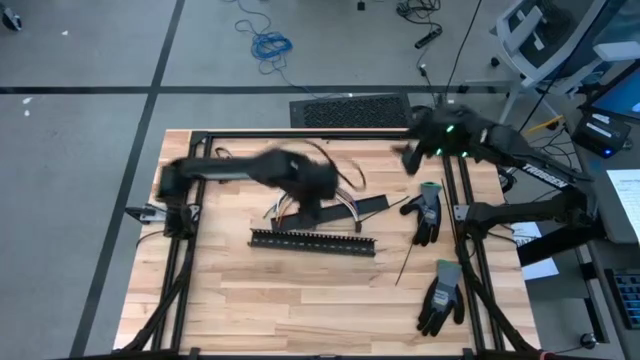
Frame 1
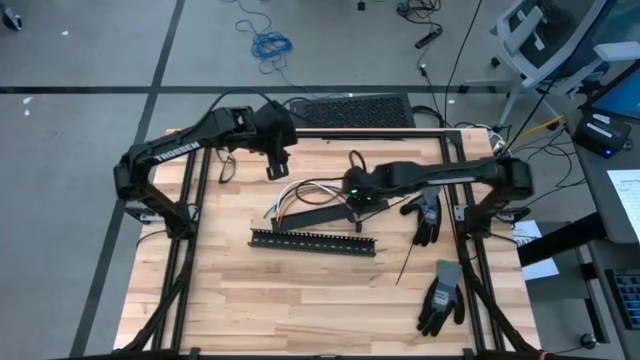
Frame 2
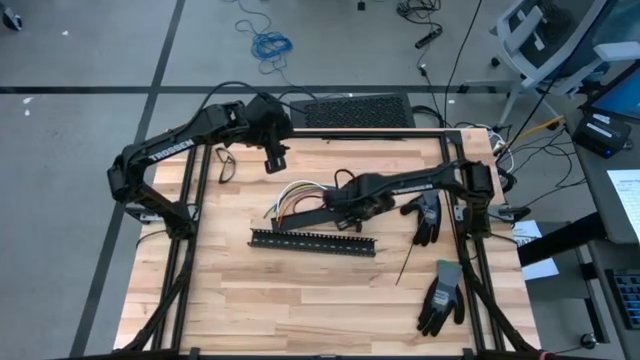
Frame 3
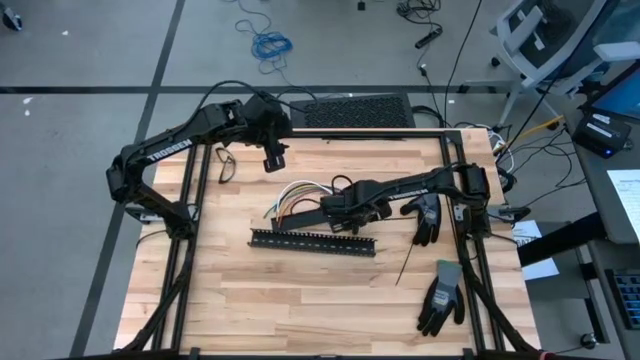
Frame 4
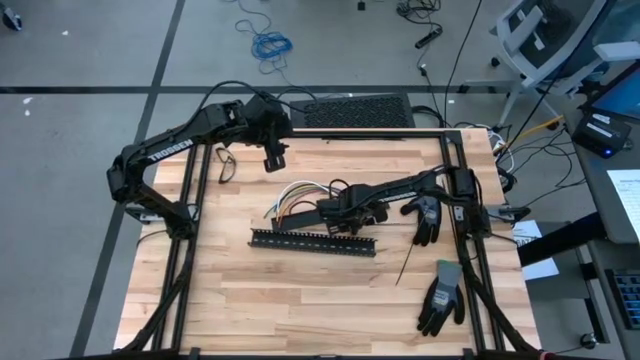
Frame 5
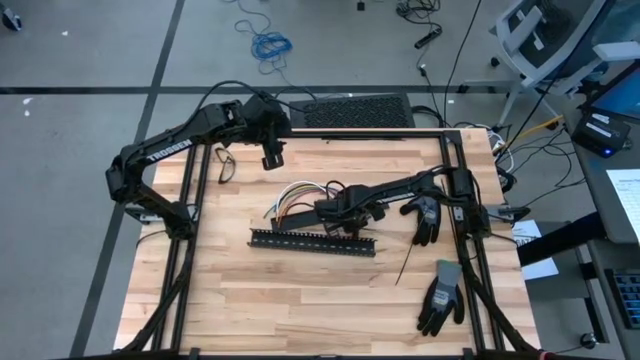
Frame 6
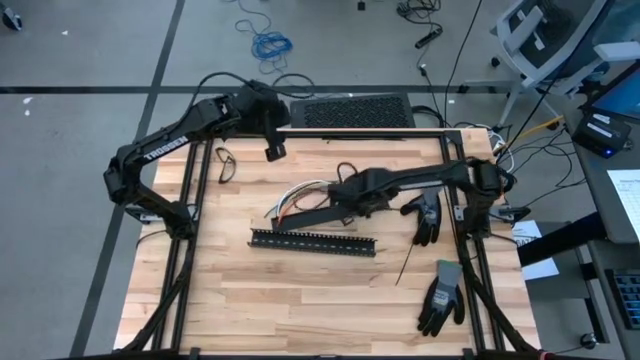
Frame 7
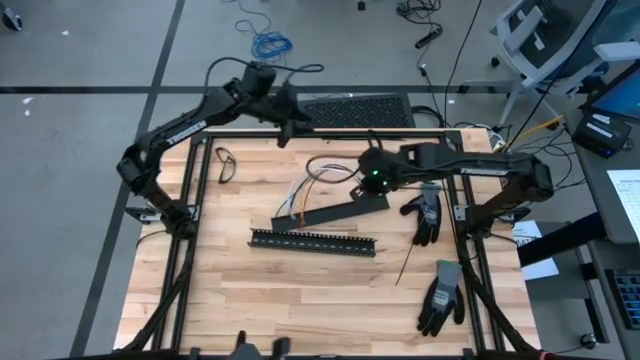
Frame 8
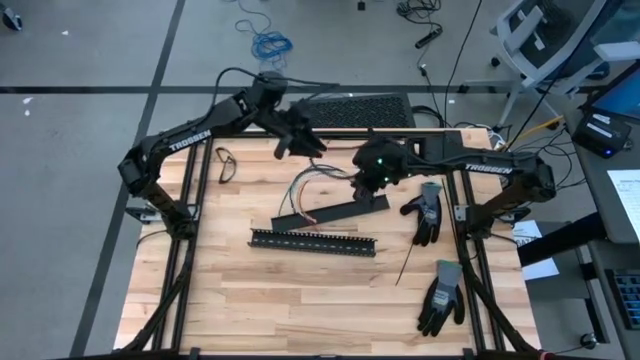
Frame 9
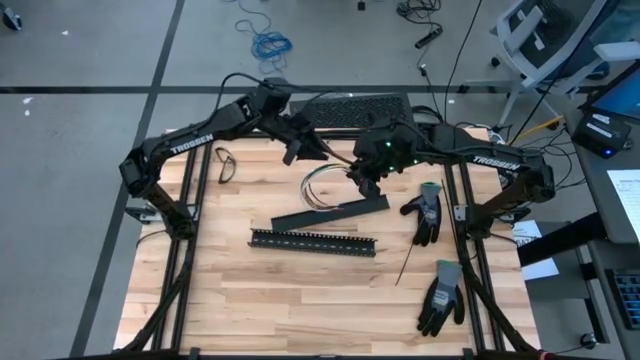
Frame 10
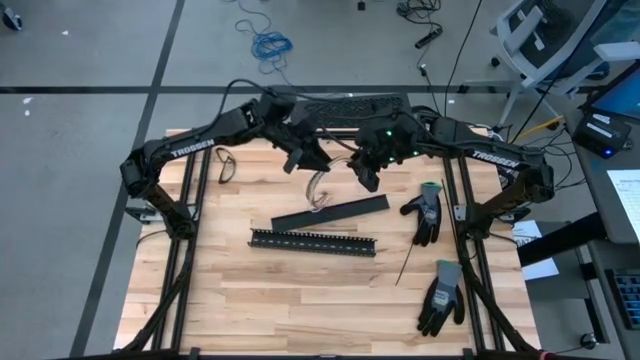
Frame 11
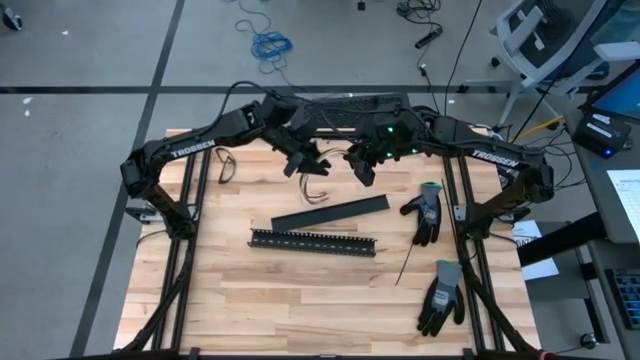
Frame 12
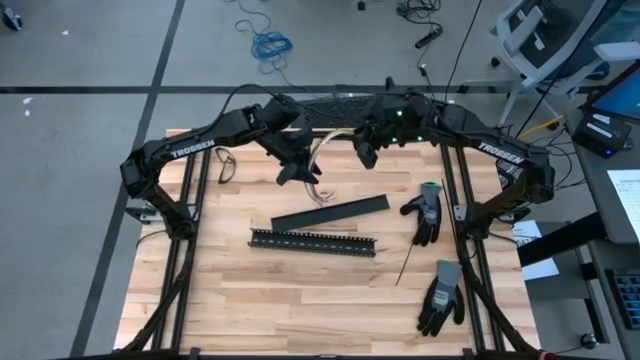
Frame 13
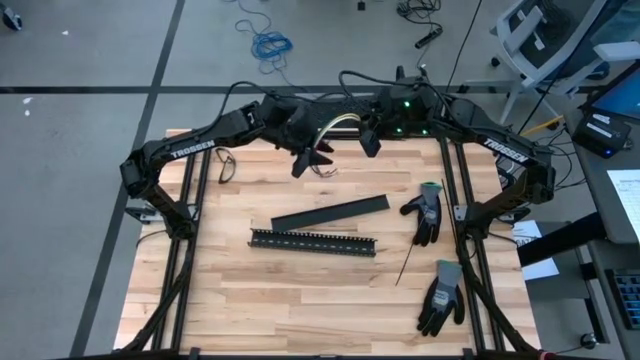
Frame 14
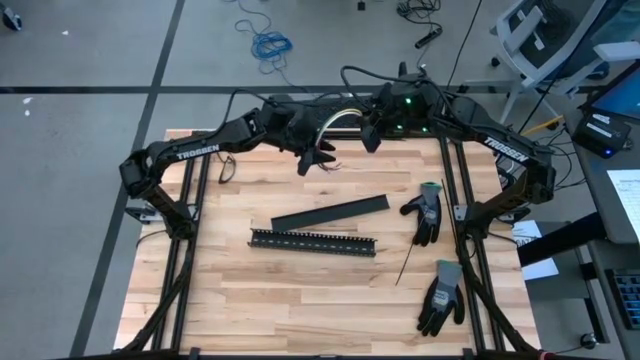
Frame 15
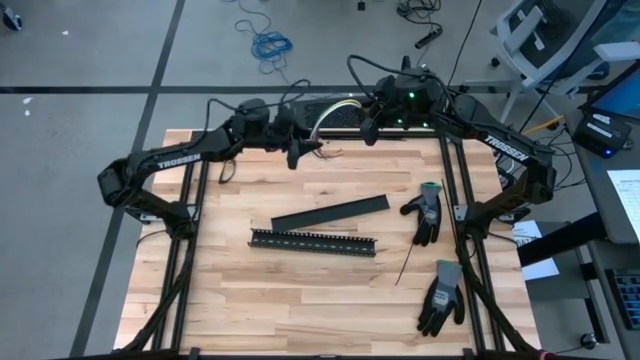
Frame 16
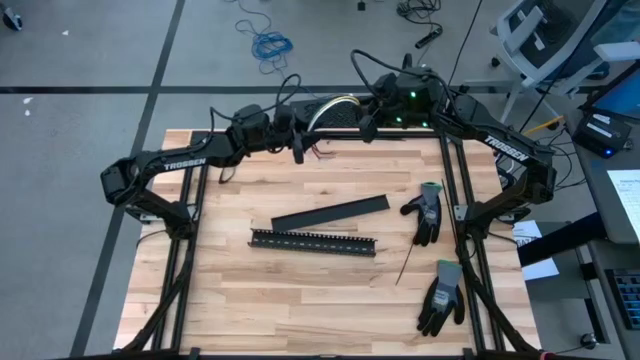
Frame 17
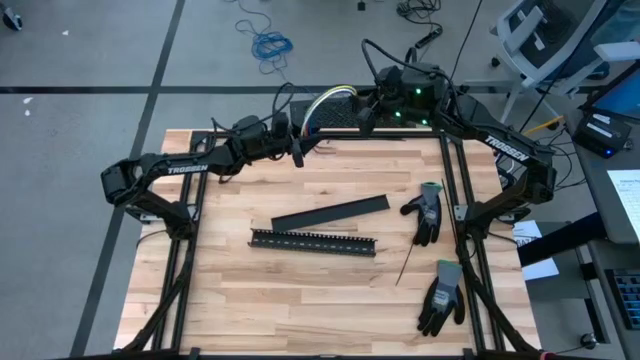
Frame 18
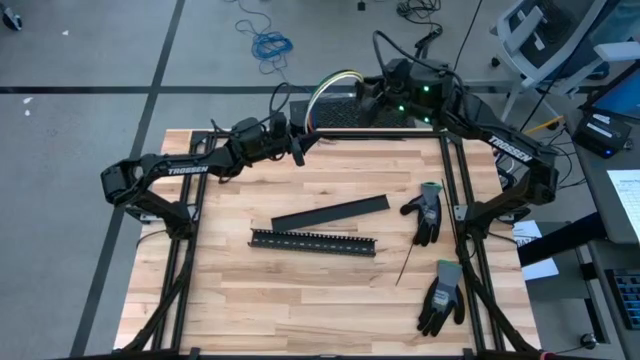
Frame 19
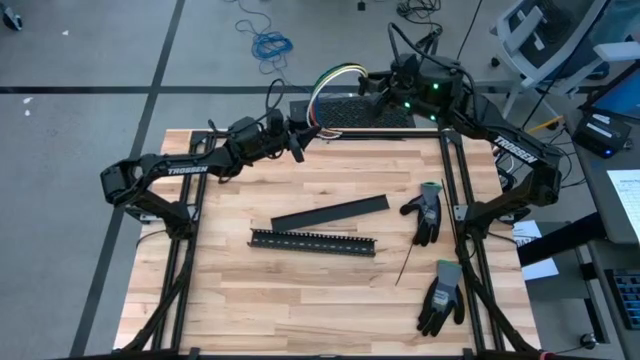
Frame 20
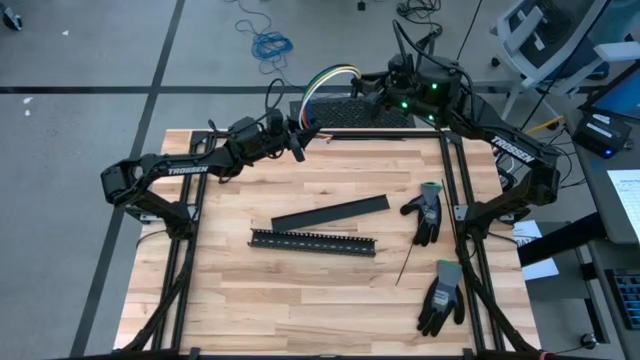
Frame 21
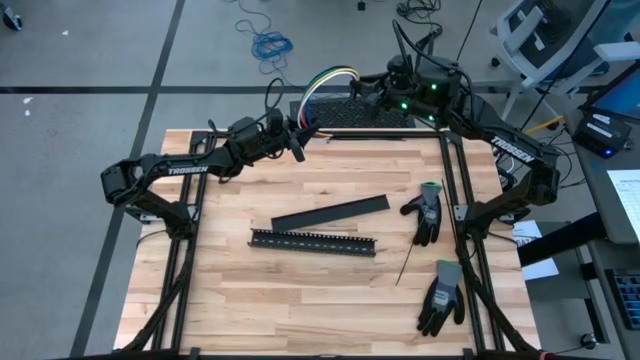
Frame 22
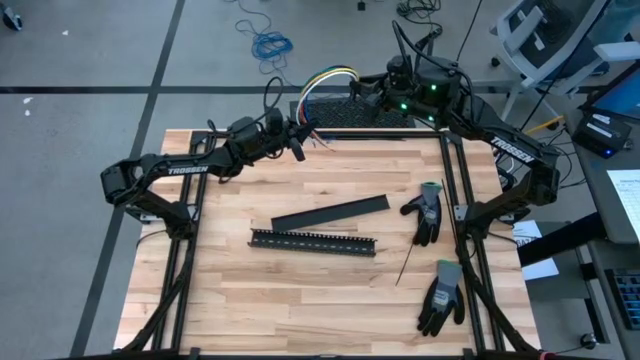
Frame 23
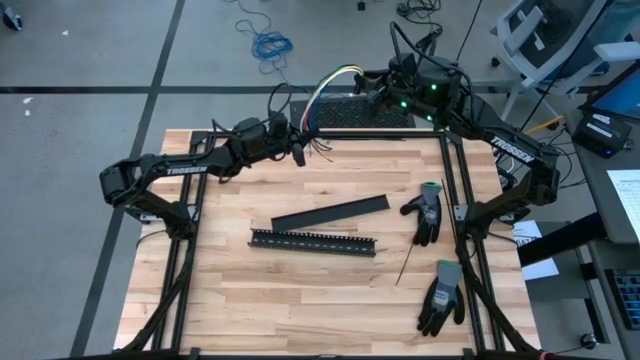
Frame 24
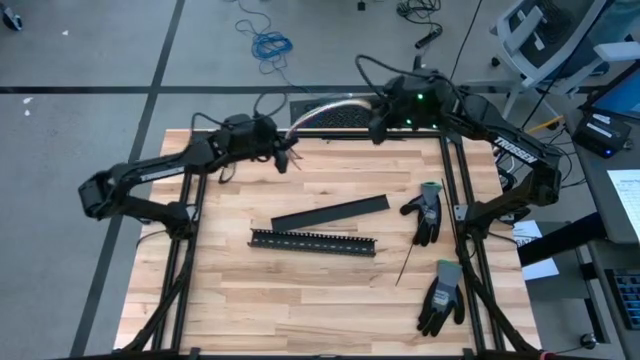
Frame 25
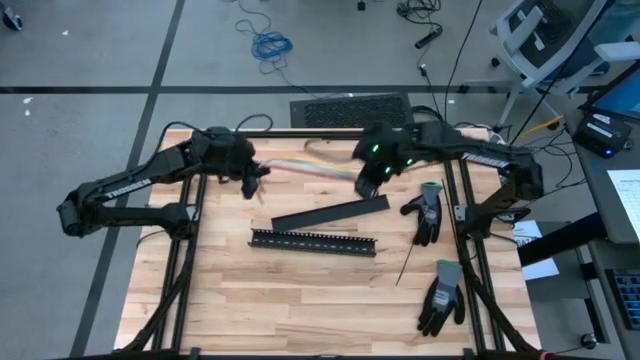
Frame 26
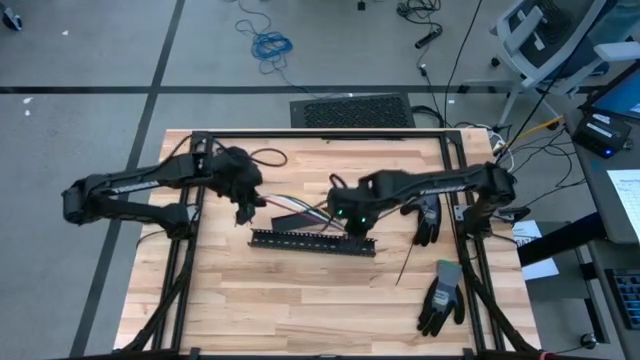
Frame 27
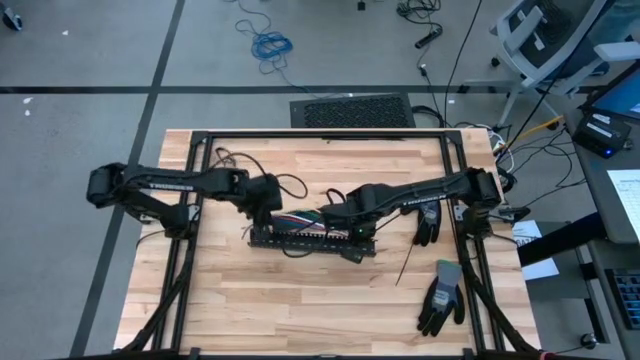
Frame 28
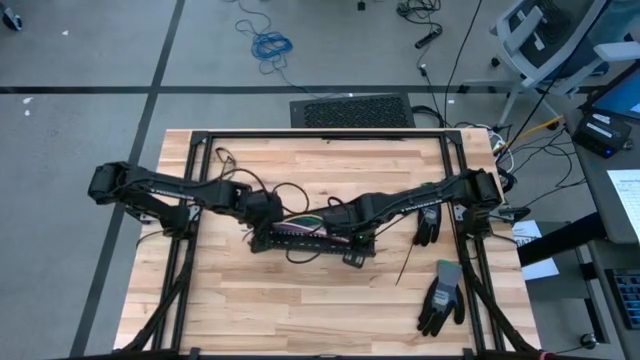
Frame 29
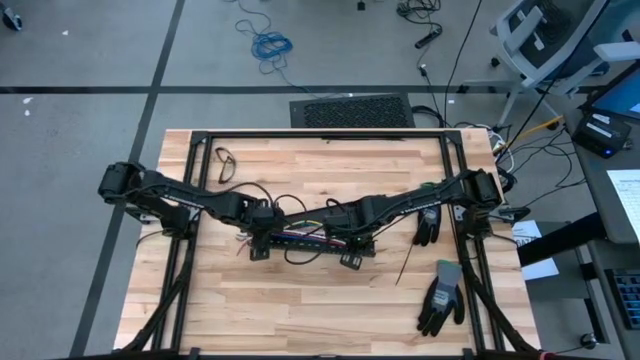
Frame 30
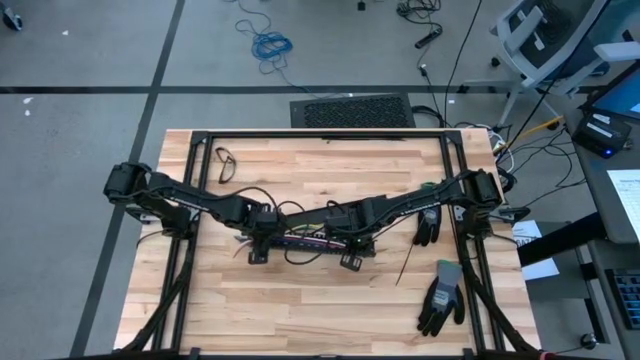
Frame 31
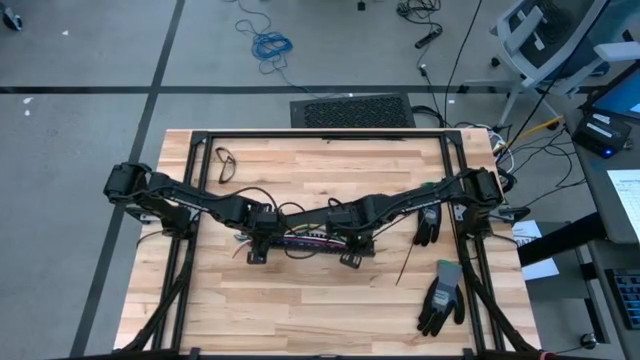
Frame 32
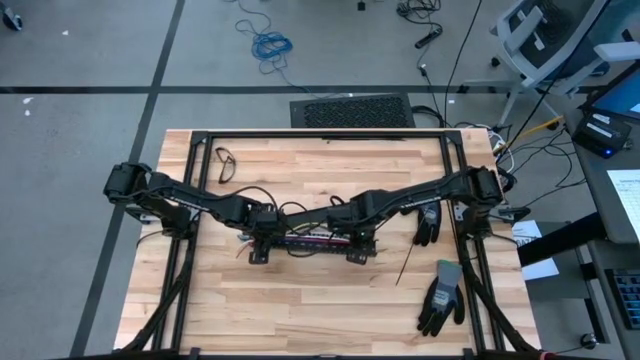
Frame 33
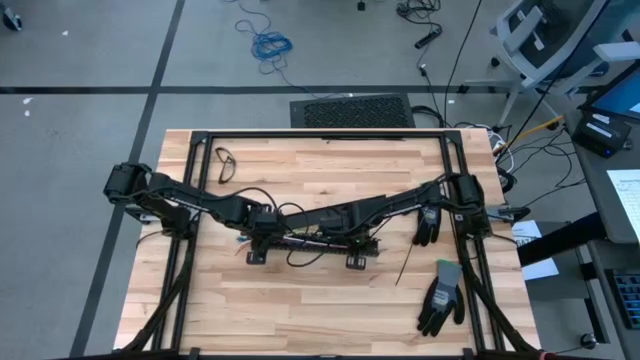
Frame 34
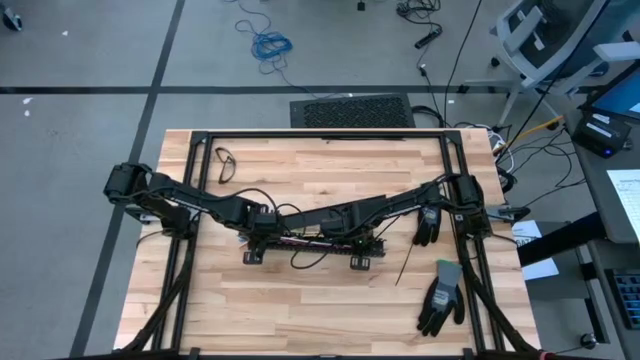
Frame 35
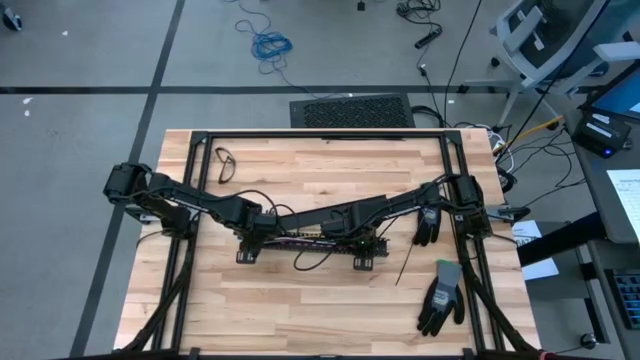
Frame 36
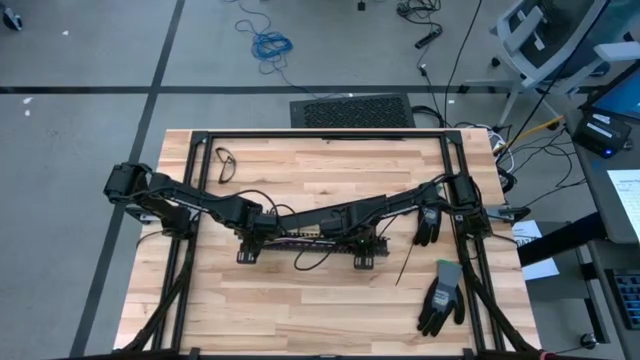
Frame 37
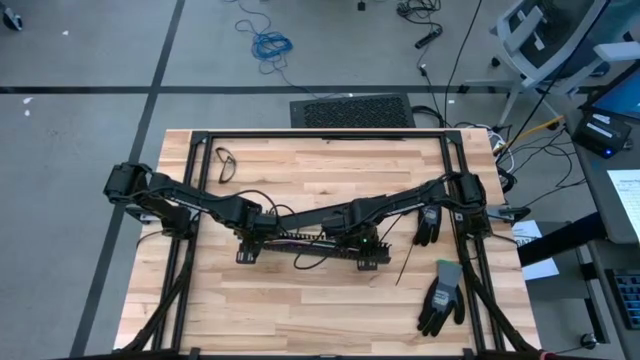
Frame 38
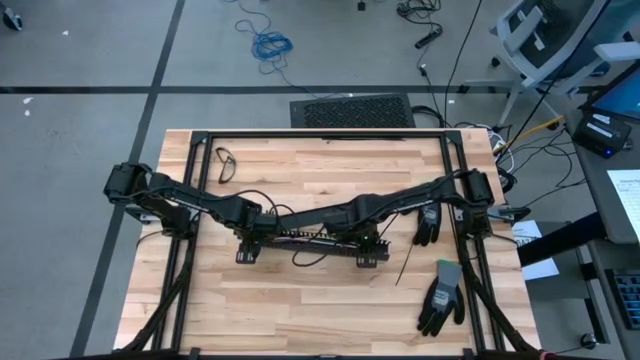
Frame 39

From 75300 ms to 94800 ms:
Task: Ziptie cables
Put the zip tied cables into the black cable duct

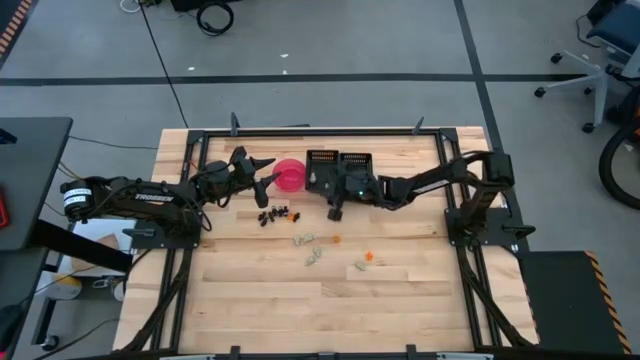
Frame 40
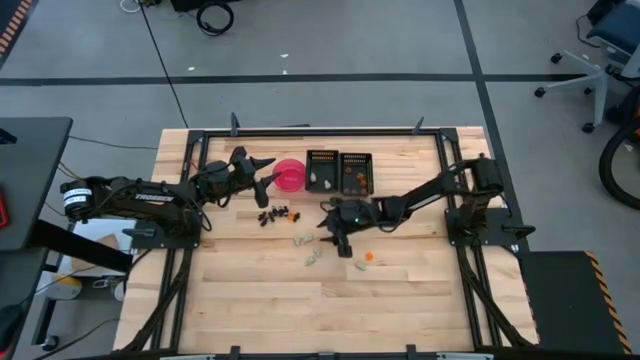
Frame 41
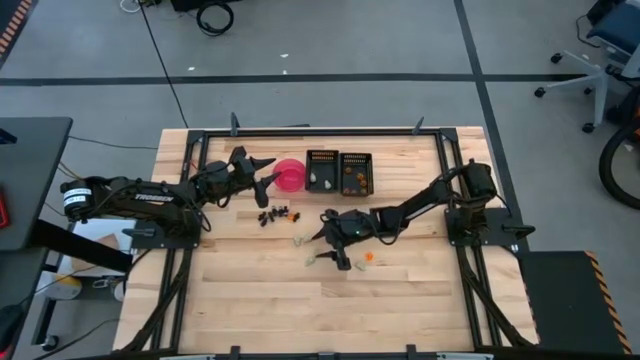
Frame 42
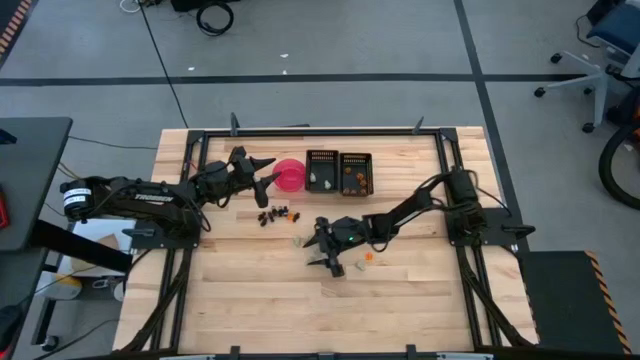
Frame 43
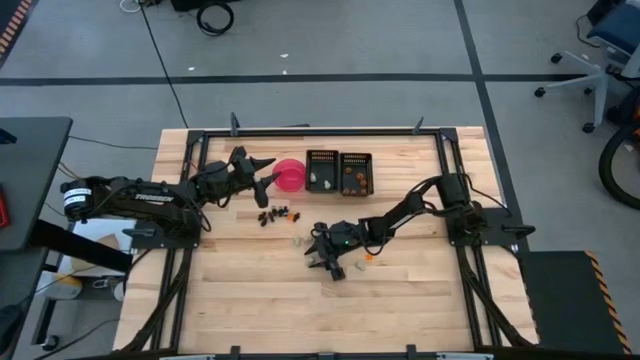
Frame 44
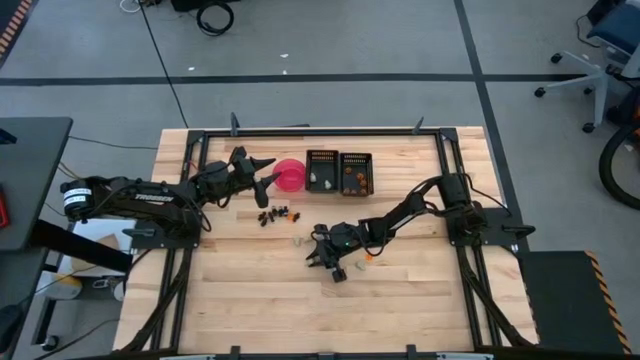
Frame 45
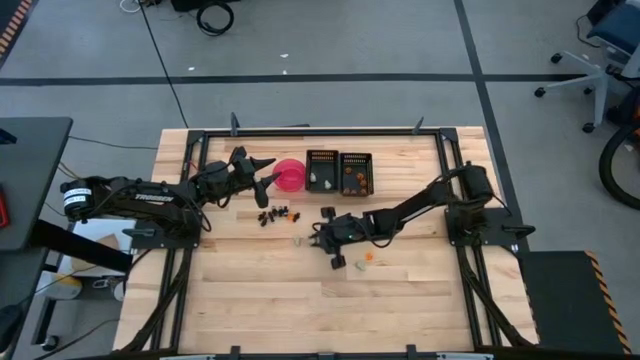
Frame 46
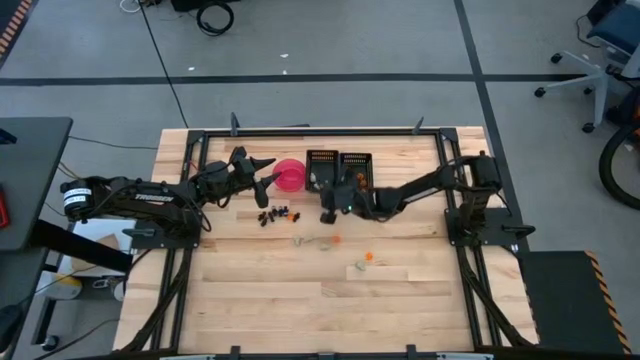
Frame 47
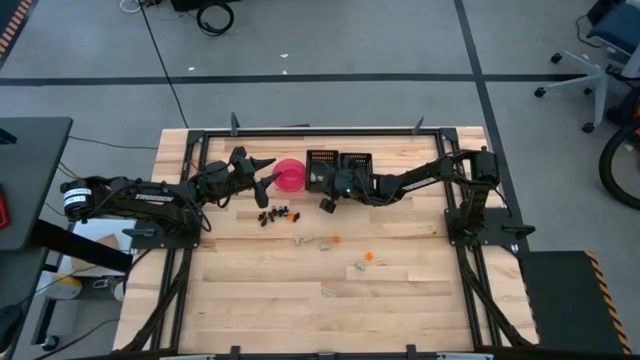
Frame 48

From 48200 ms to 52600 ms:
Task: Sort Halloween decoration
Put the white skull toy into the left black bin
